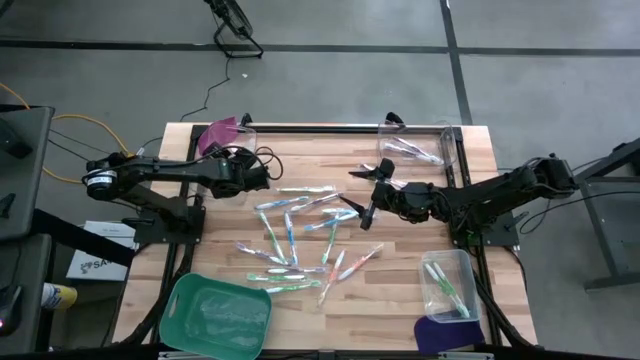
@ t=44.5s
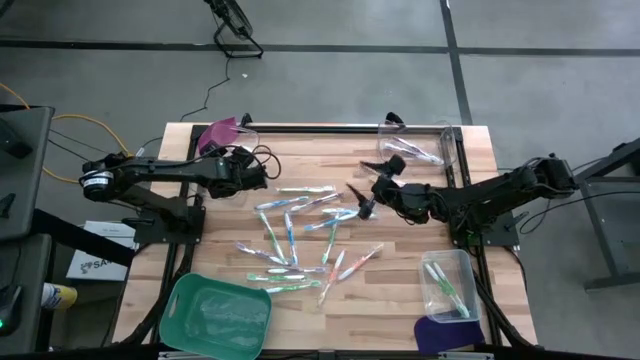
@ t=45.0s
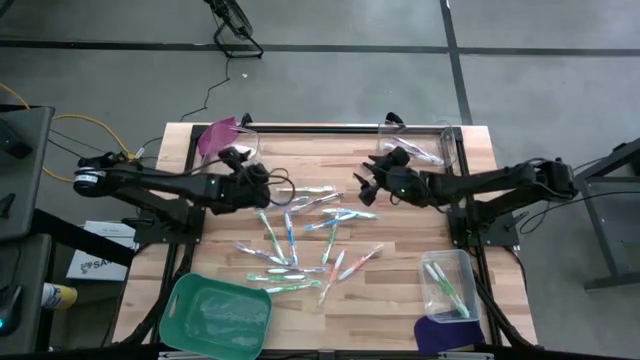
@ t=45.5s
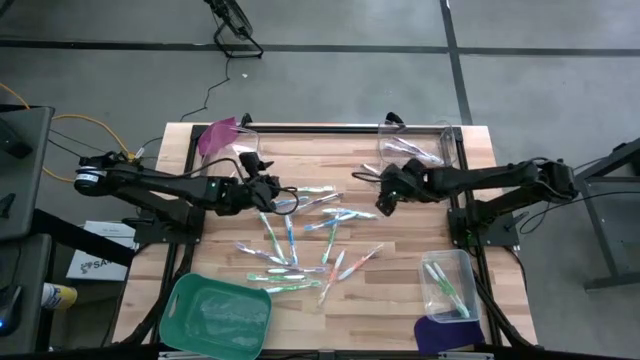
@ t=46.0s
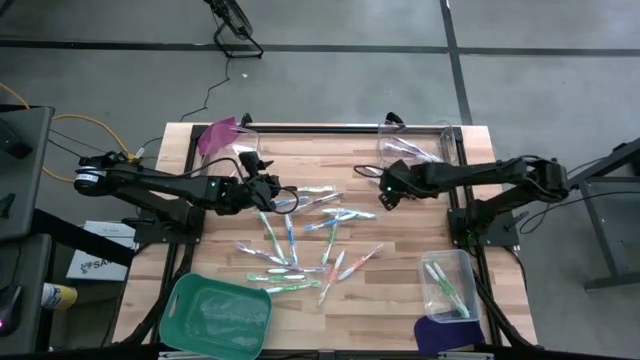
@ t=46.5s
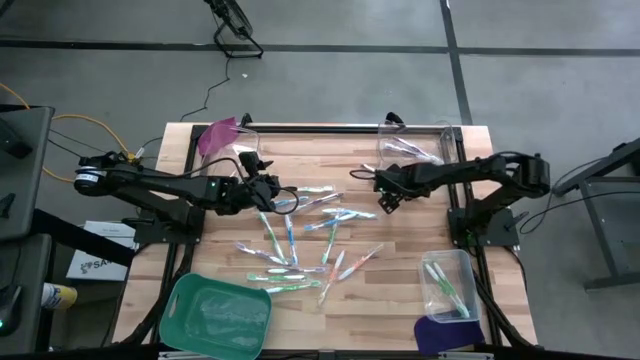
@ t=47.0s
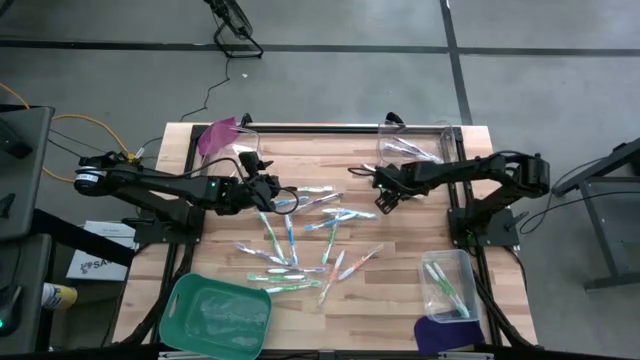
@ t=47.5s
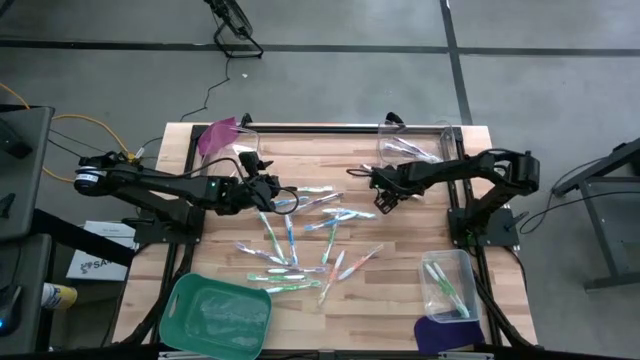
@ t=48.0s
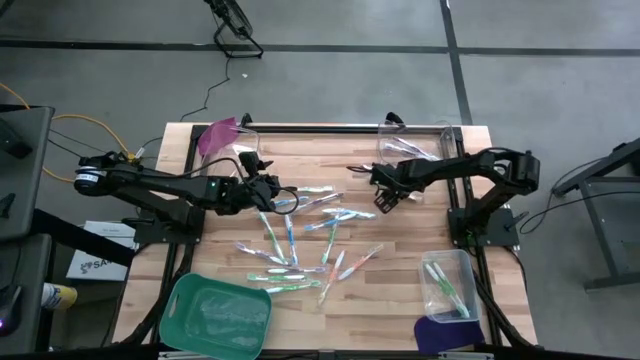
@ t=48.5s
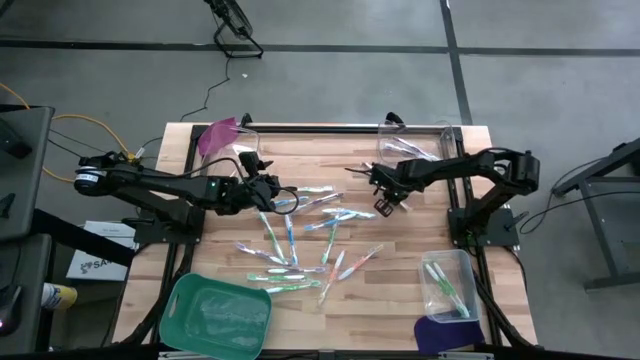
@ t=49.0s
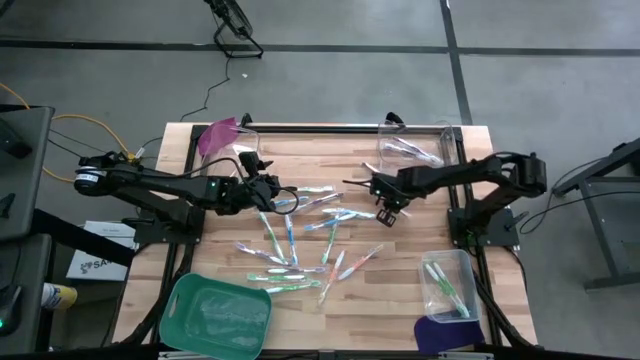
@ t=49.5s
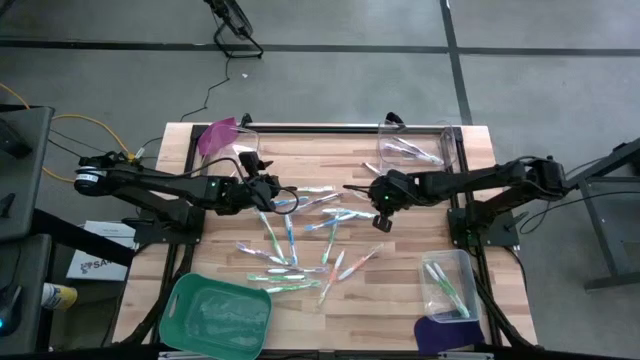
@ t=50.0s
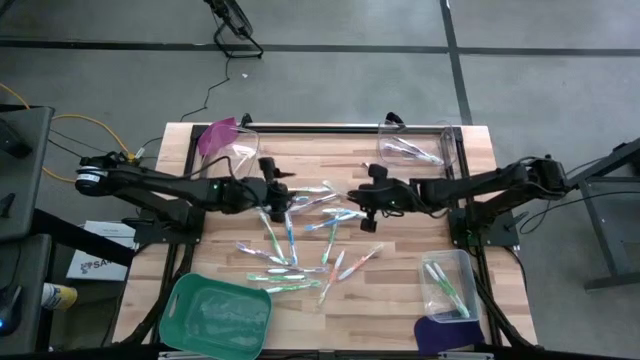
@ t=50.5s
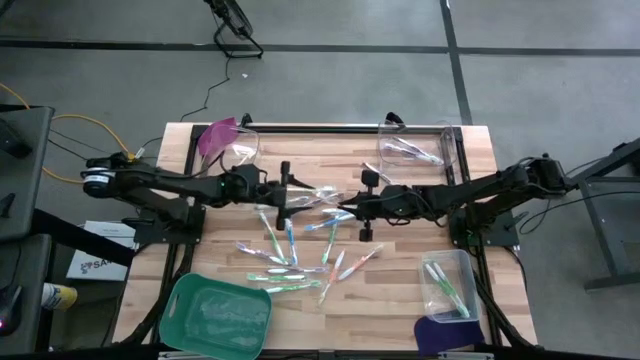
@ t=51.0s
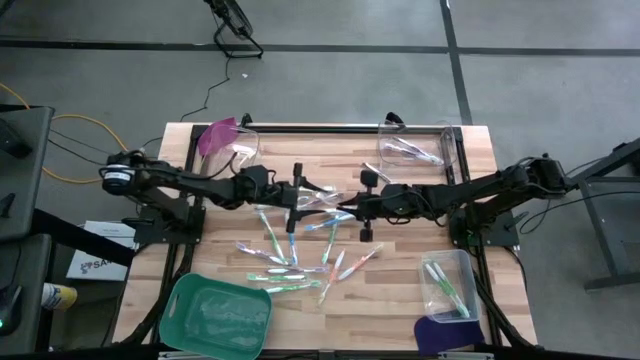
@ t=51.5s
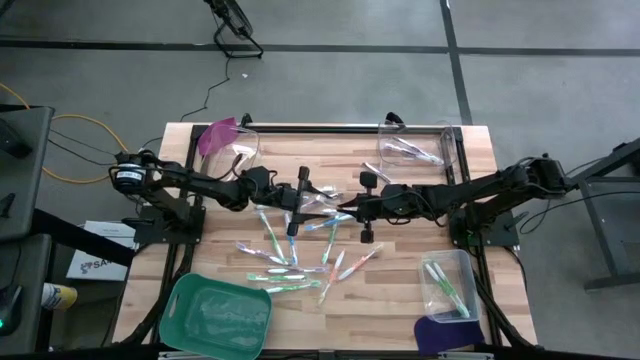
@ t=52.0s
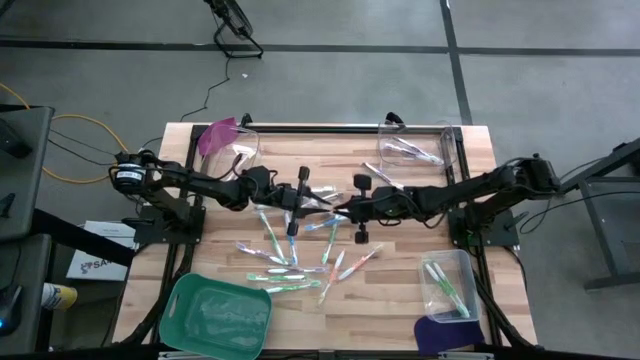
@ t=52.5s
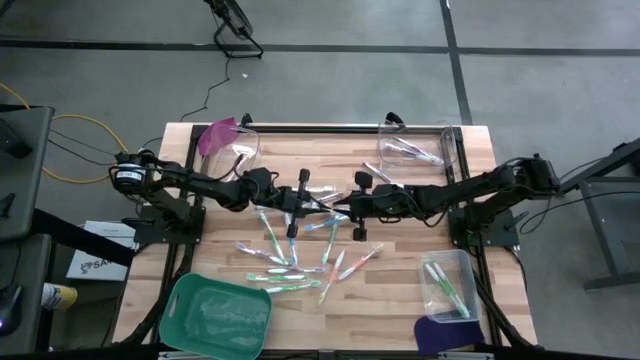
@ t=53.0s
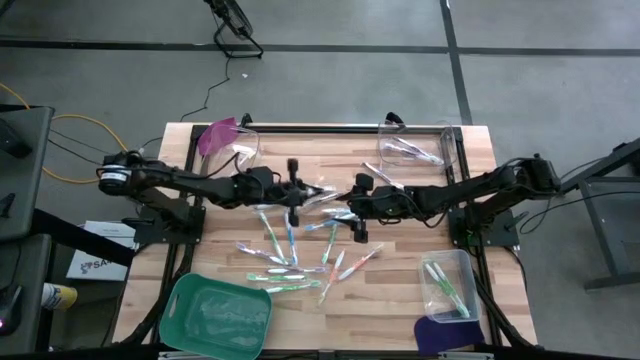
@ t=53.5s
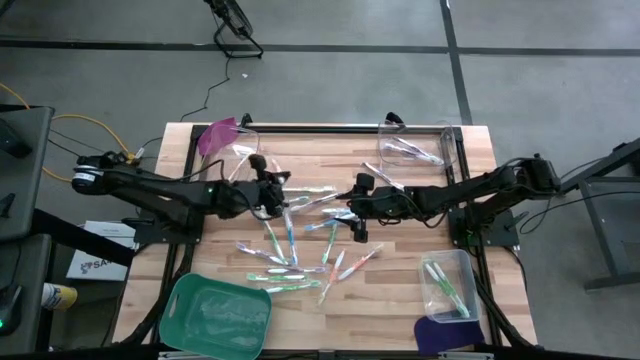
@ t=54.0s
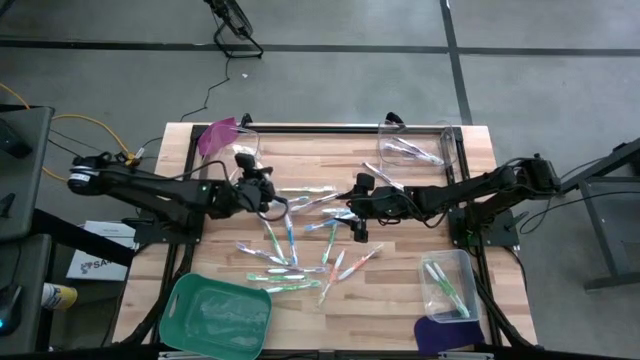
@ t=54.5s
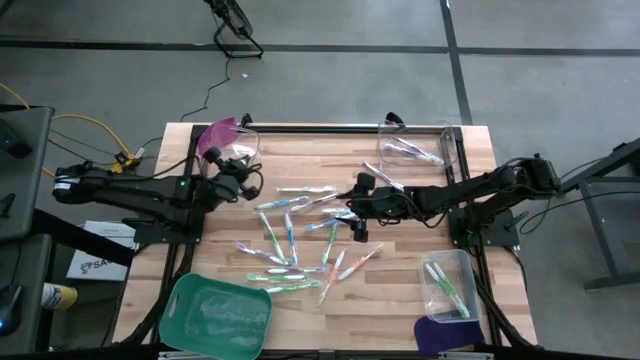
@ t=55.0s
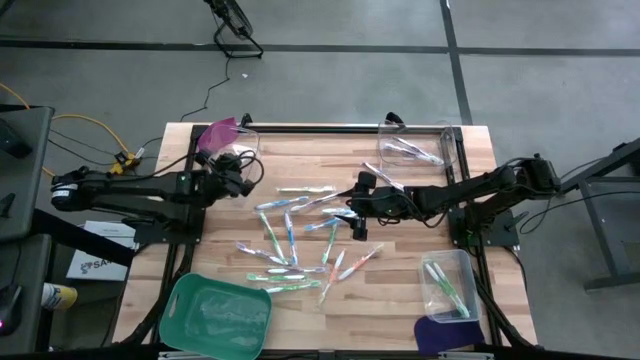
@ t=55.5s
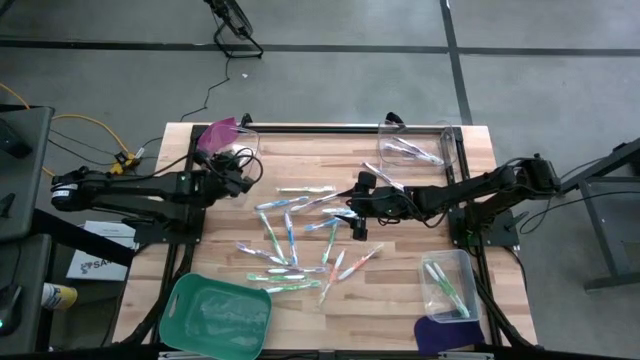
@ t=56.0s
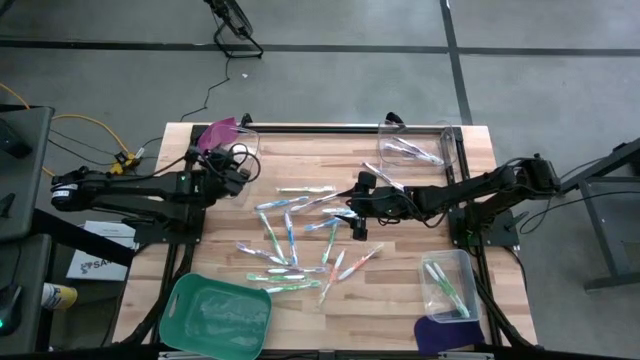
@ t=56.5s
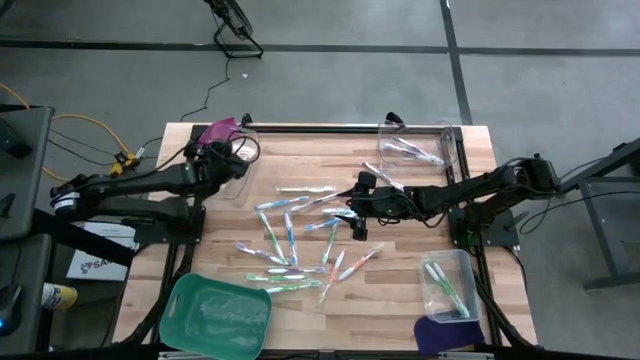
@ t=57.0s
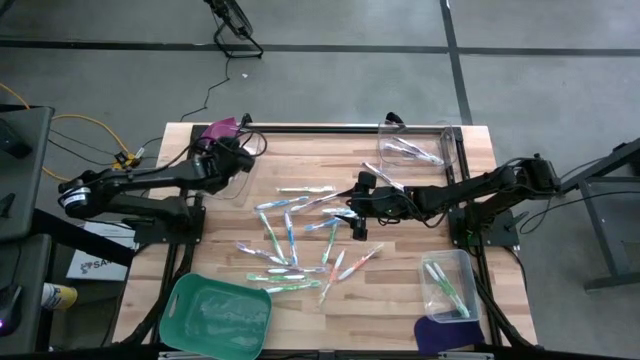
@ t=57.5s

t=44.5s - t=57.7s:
Task: Pick & Place Toothbrushes
Put the orange toothbrush into the left transparent bin

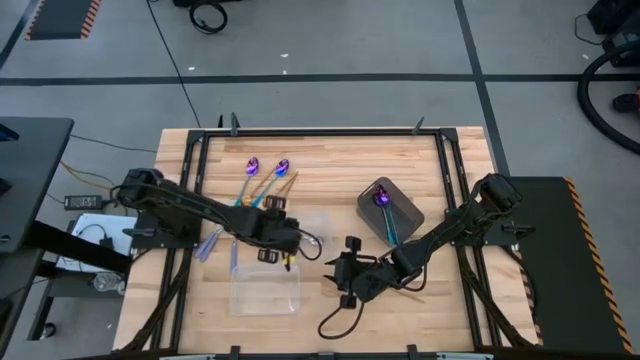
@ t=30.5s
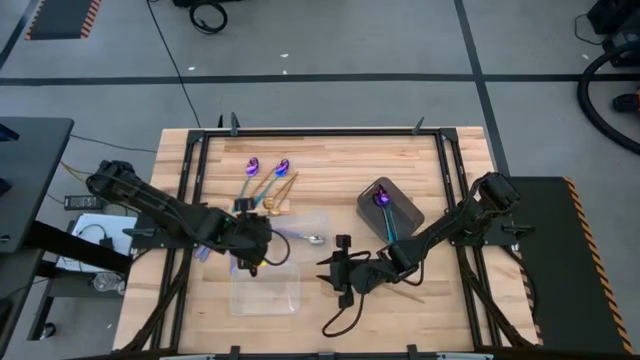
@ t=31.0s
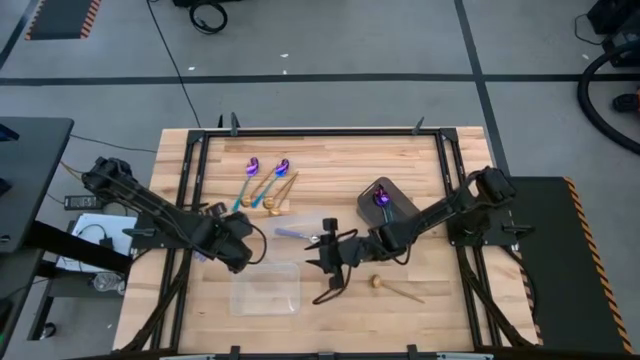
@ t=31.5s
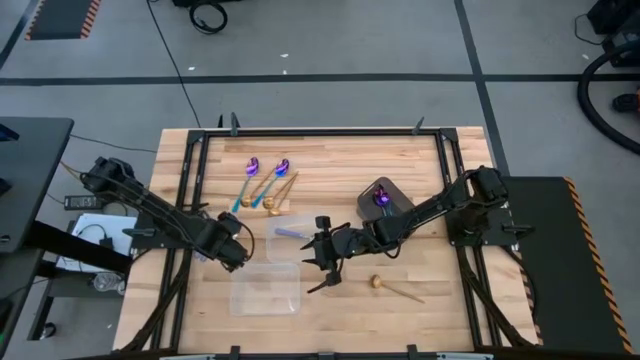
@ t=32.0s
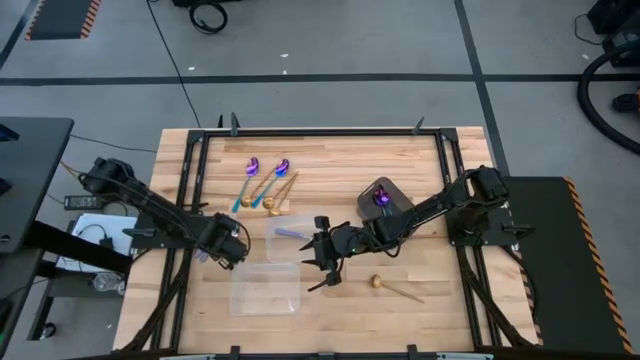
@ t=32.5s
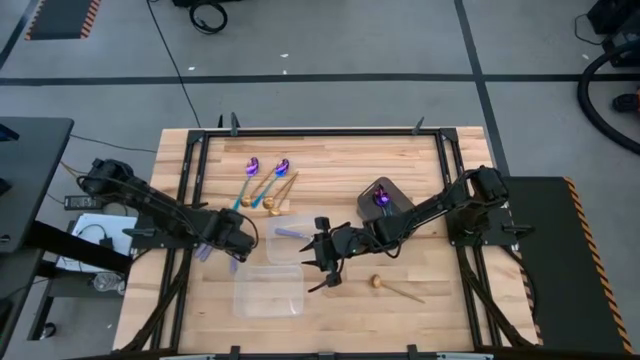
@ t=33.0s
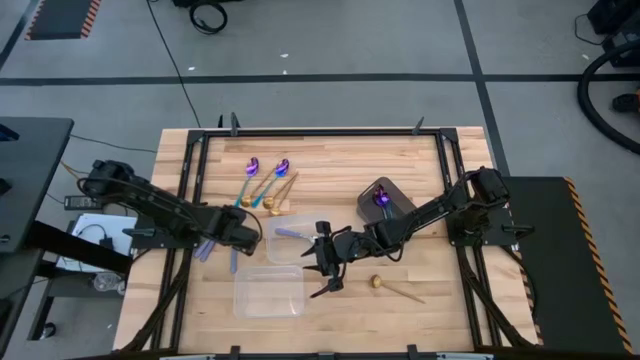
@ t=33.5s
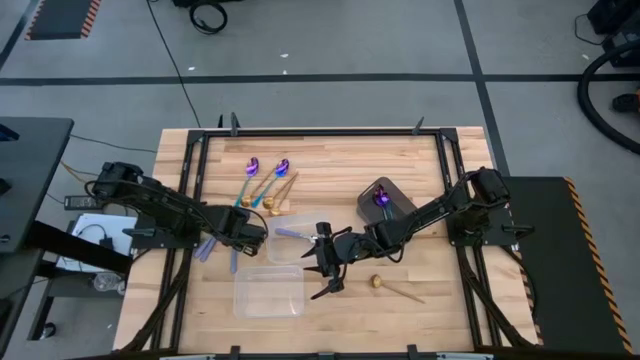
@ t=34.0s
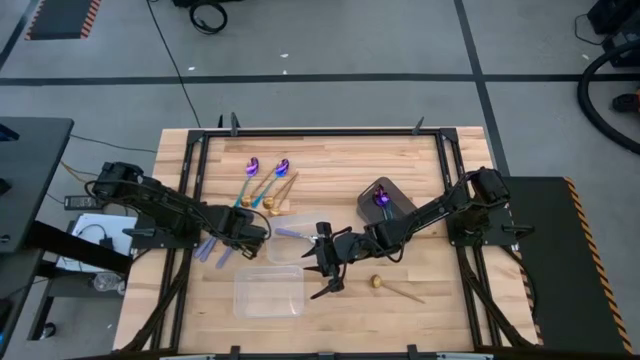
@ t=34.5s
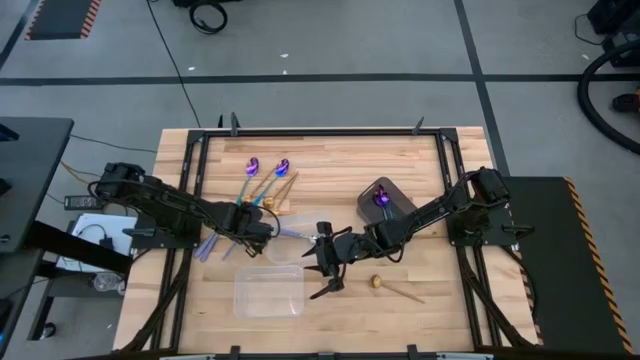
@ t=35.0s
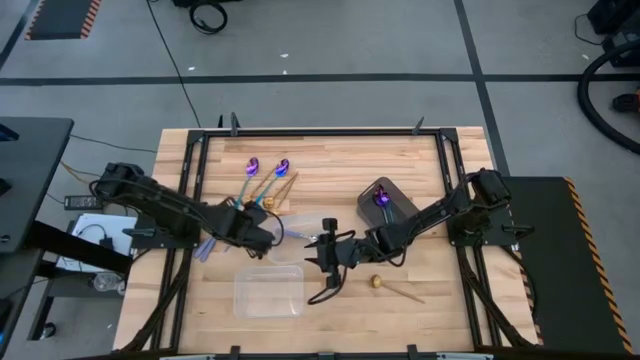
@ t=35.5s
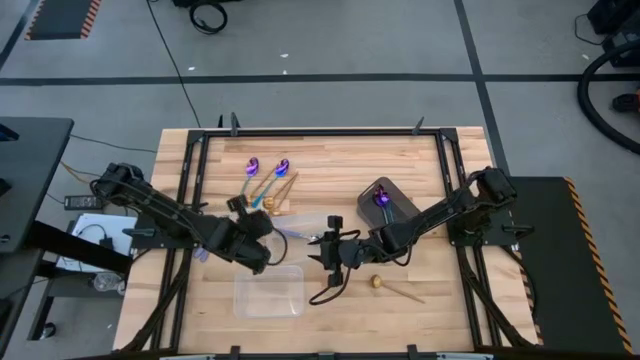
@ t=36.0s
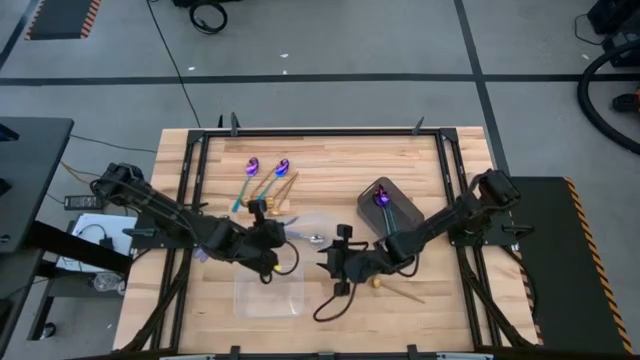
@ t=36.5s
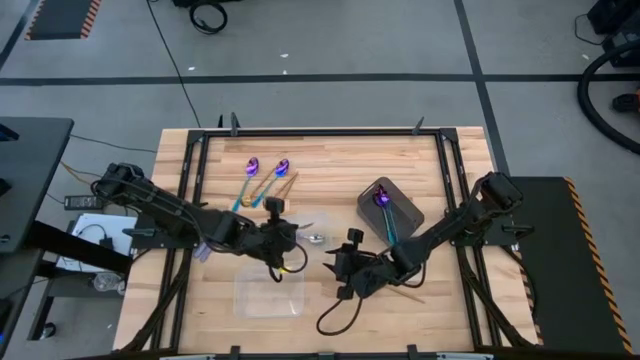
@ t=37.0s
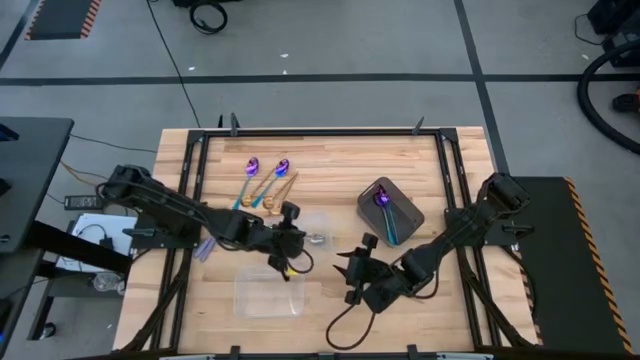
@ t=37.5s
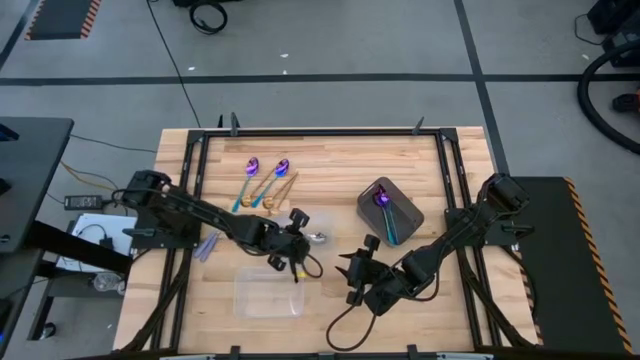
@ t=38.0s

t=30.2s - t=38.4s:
Task: Sort silverware by color (type)
Put the violet spoon into the top transparent bin
